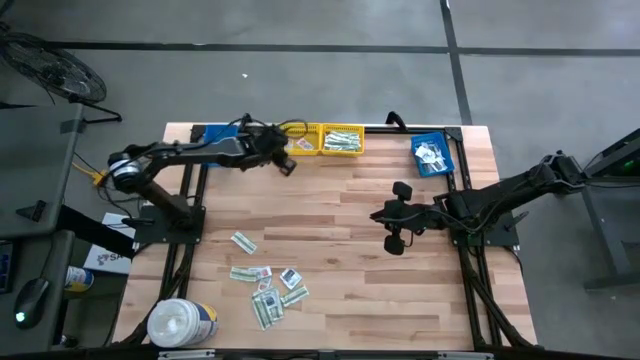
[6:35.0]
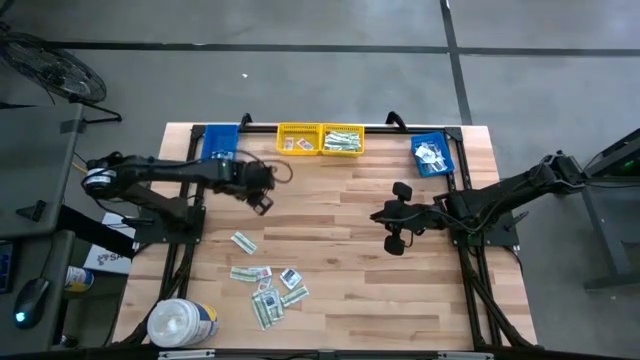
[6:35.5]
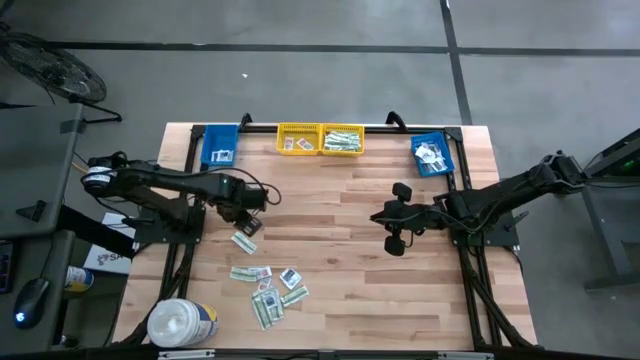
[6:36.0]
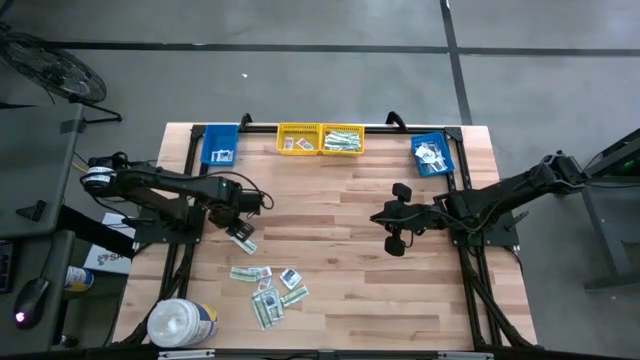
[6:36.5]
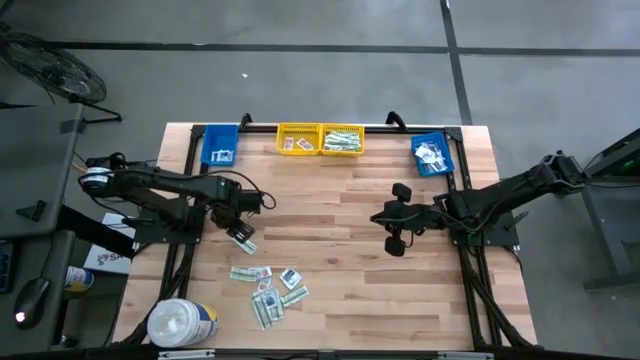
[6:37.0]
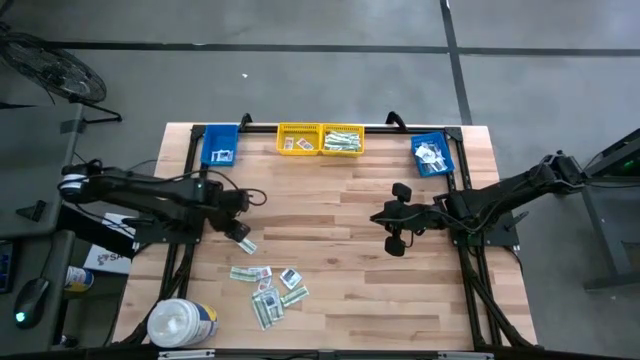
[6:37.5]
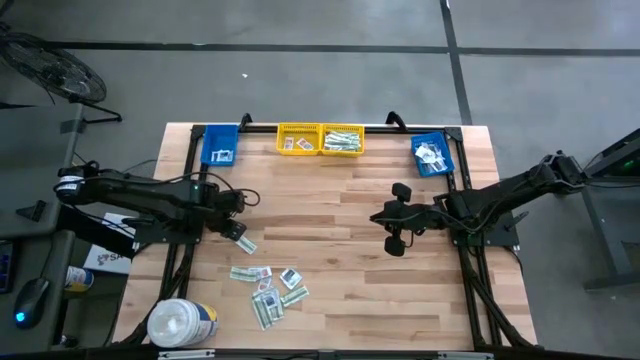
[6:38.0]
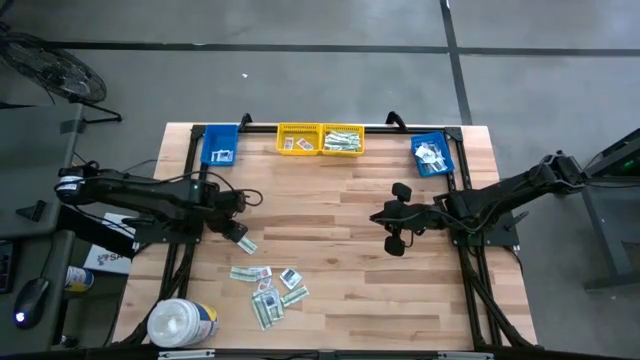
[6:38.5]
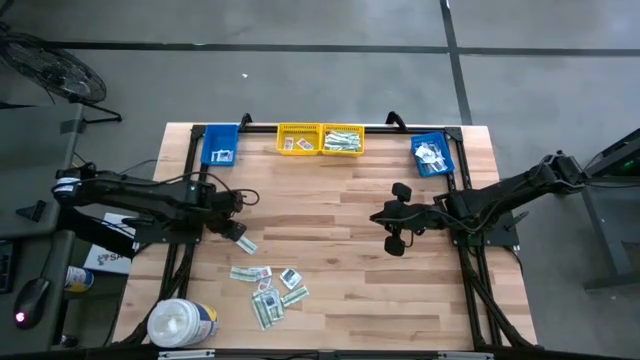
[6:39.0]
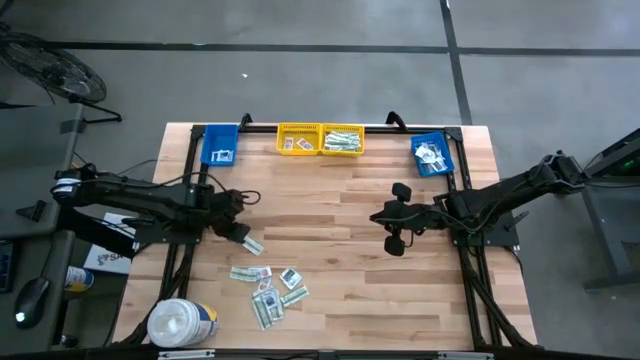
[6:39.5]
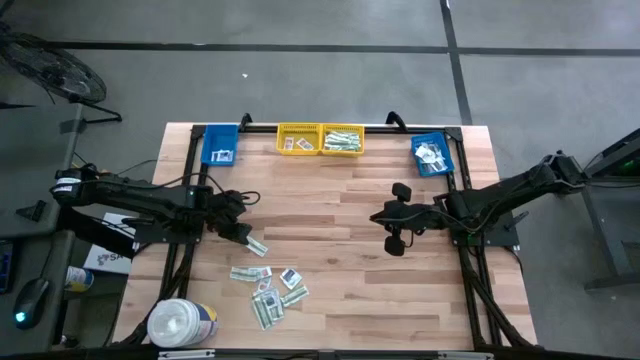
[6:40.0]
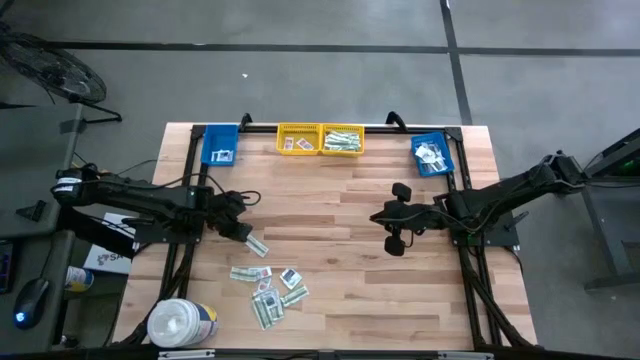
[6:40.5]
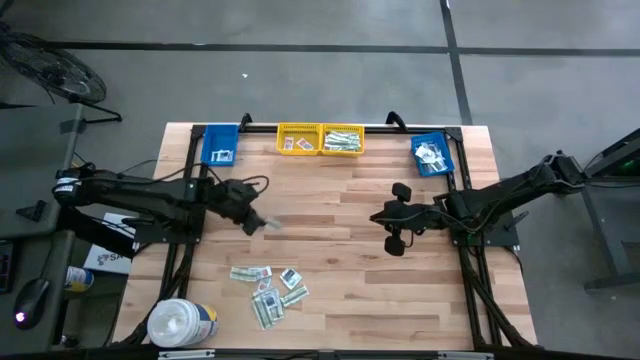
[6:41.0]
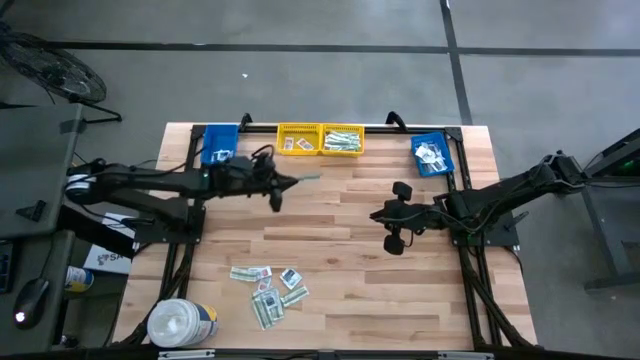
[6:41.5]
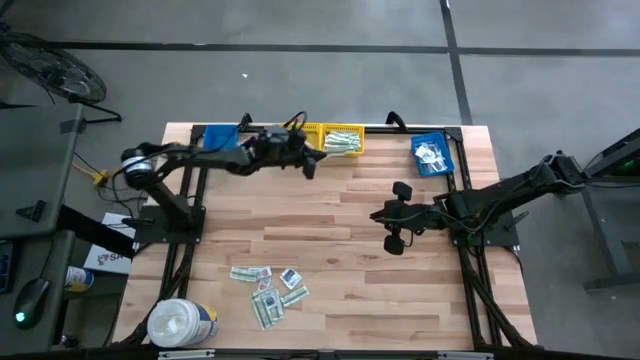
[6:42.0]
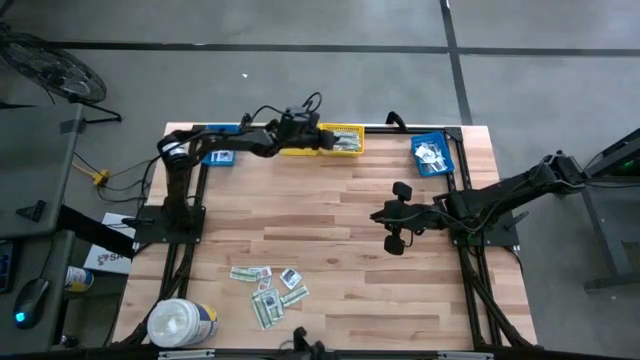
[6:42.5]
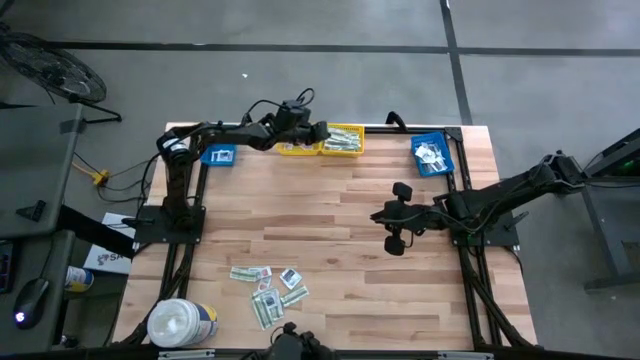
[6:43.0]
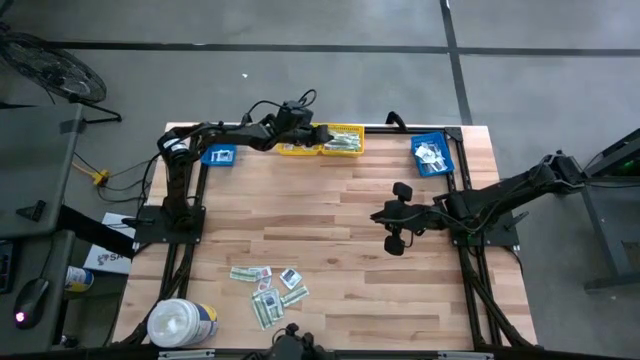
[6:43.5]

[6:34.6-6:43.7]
Task: Pick & Place First Aid Supplies
Put the green bandage pack into the right yellow bin

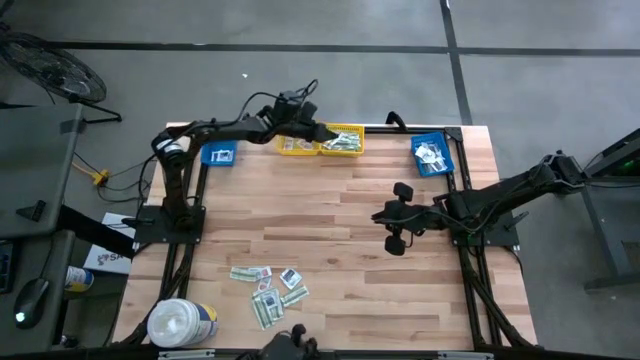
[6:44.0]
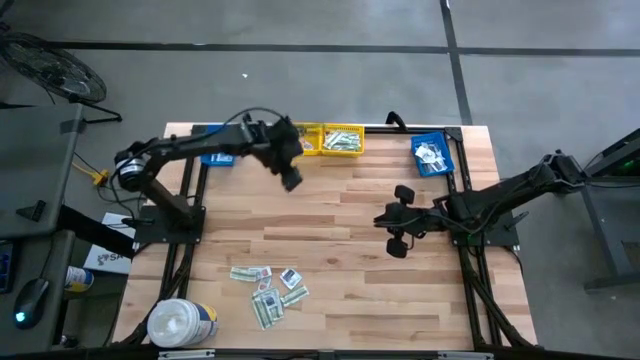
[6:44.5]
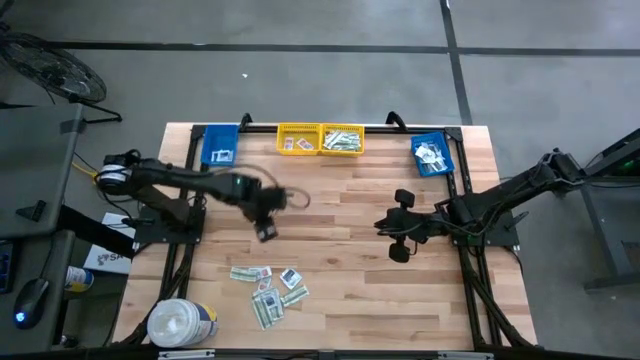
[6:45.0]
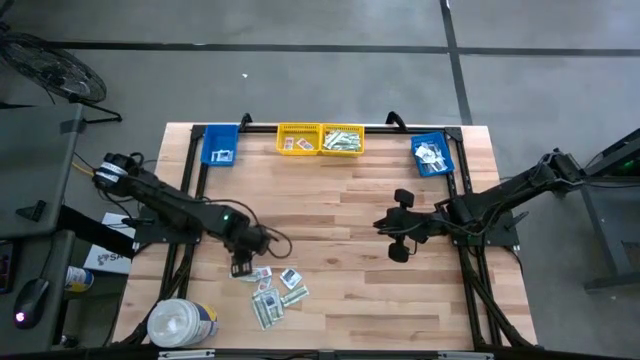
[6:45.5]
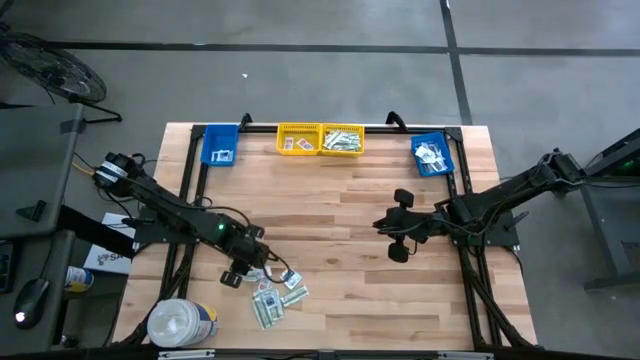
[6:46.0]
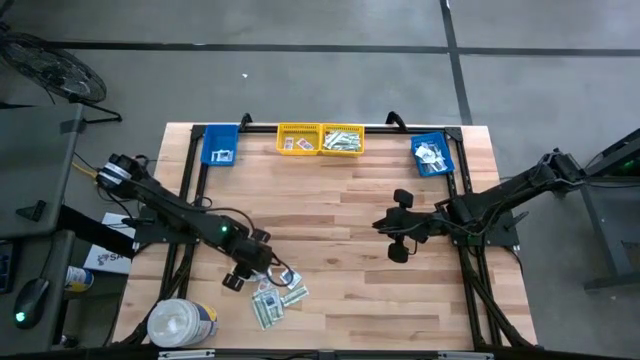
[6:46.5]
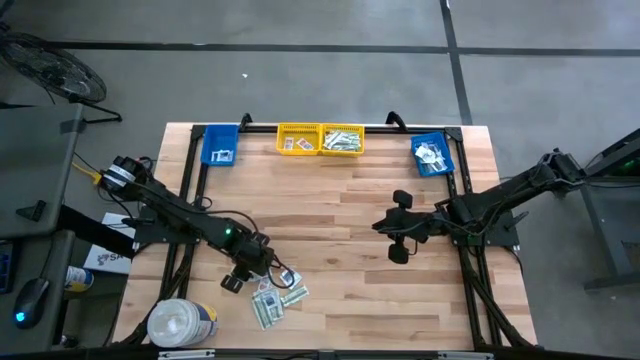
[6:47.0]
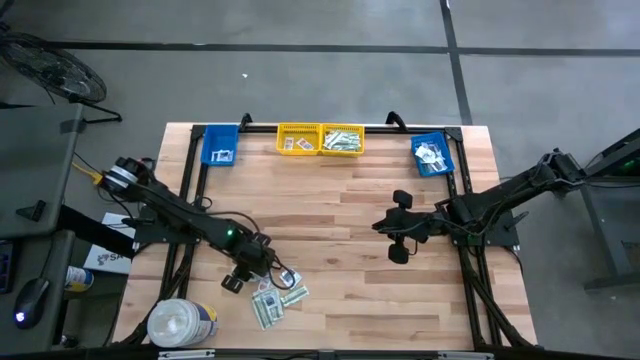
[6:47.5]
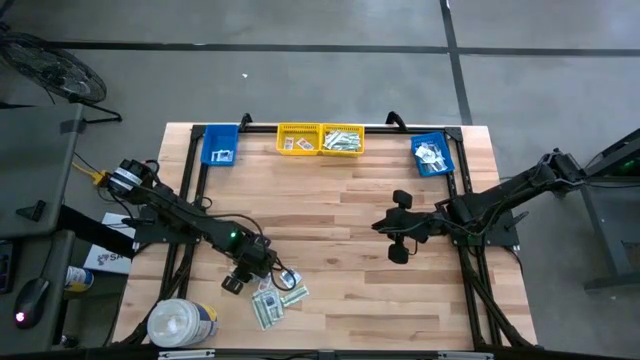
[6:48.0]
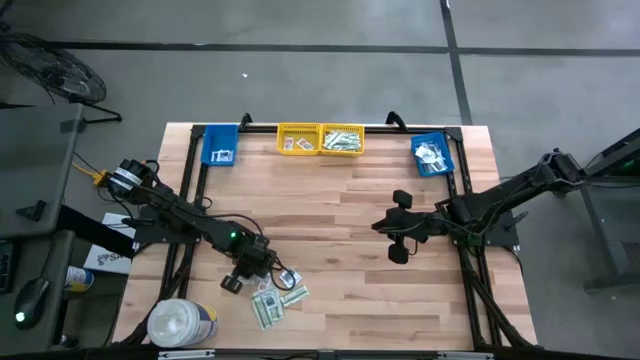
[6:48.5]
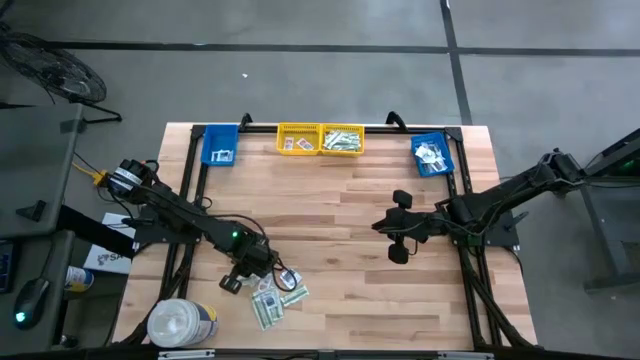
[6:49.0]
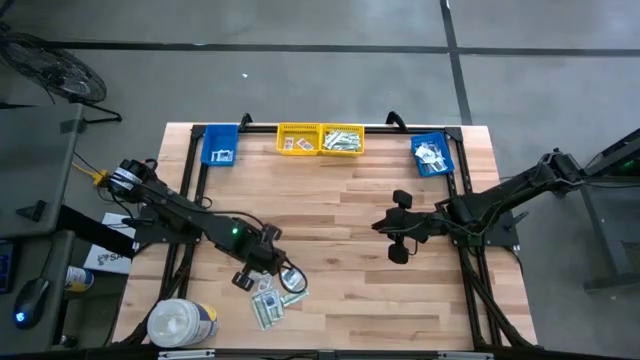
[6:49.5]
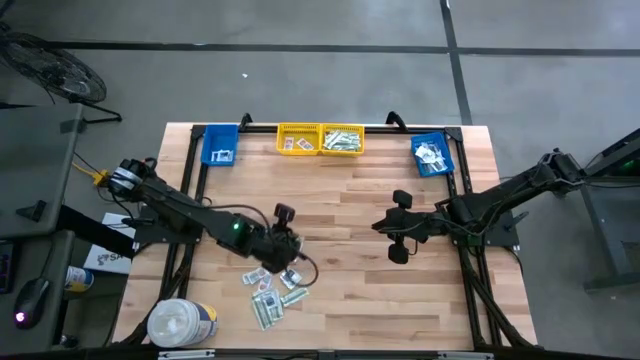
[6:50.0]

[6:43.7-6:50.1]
Put the green bandage pack into the right yellow bin

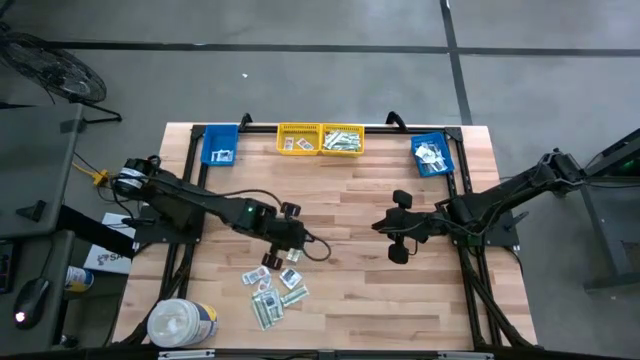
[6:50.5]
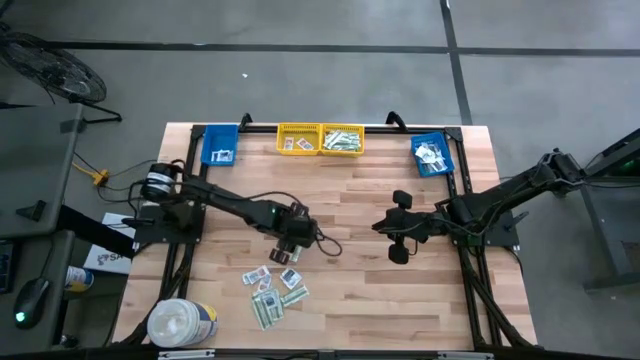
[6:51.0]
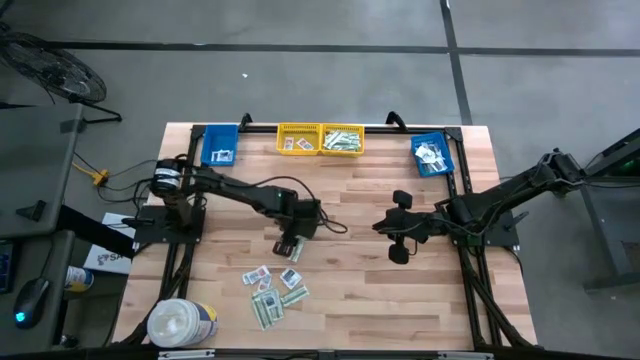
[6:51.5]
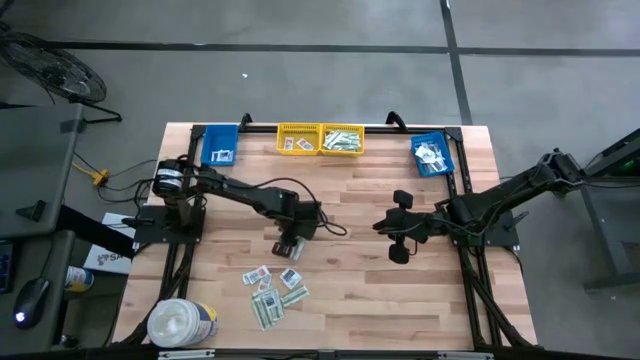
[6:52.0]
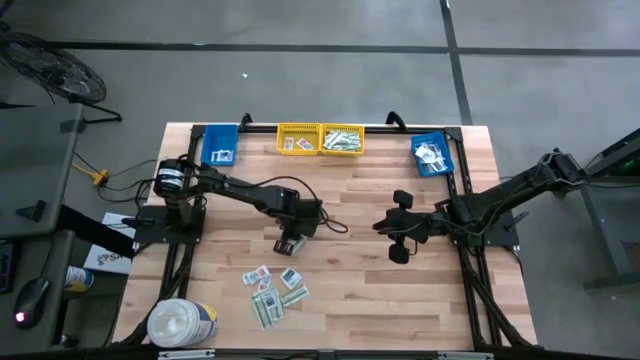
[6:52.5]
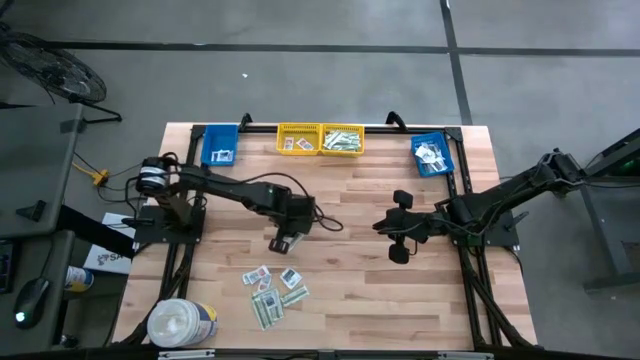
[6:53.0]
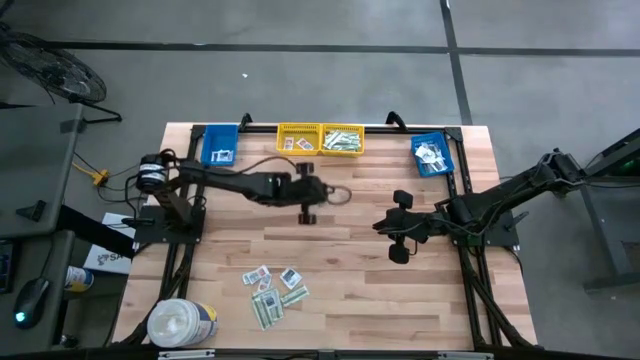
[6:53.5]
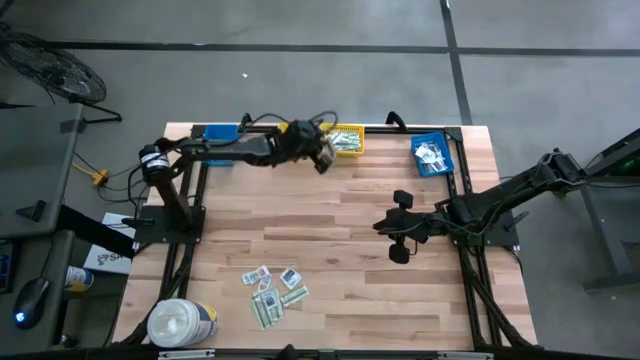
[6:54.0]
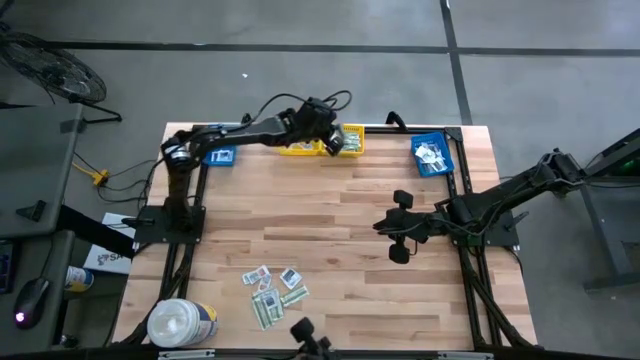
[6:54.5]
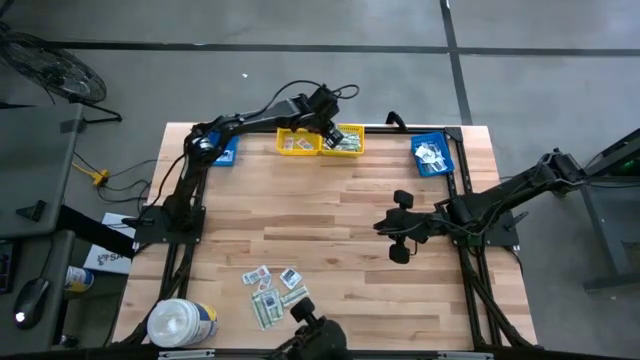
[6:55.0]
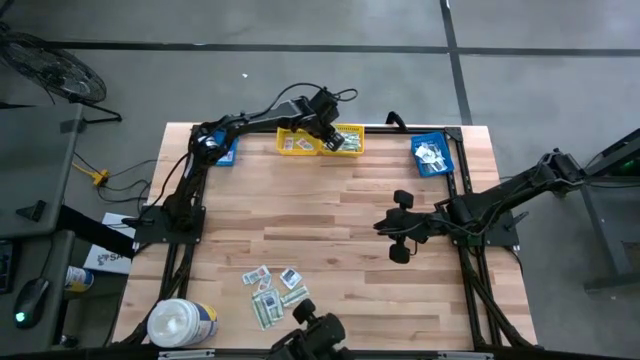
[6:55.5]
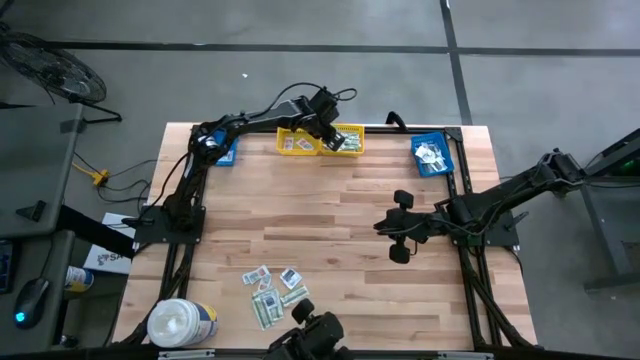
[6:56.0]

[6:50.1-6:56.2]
Put the green bandage pack into the right yellow bin
